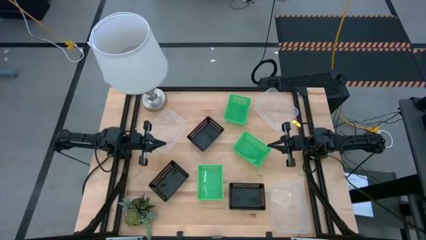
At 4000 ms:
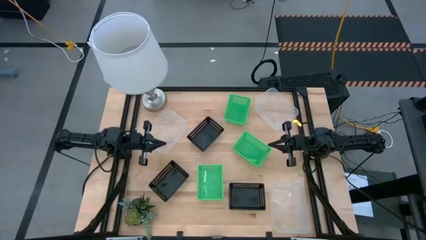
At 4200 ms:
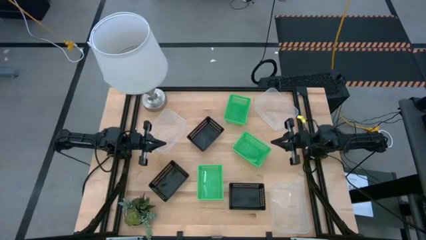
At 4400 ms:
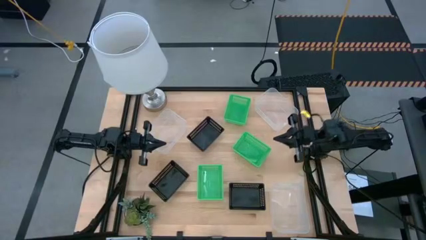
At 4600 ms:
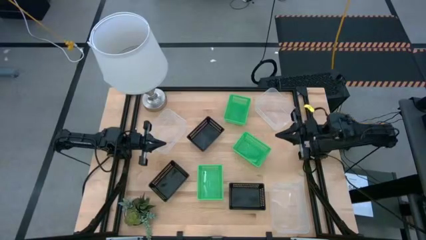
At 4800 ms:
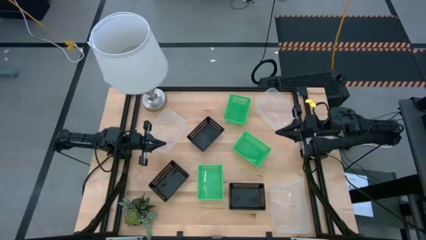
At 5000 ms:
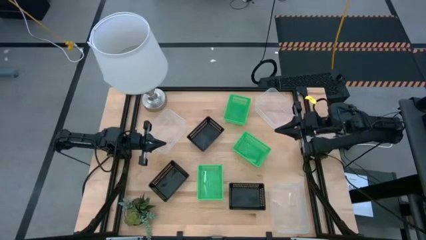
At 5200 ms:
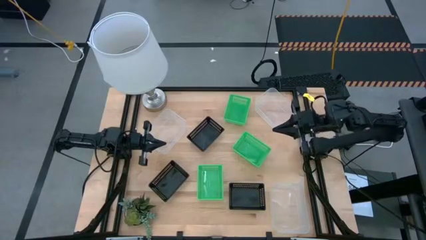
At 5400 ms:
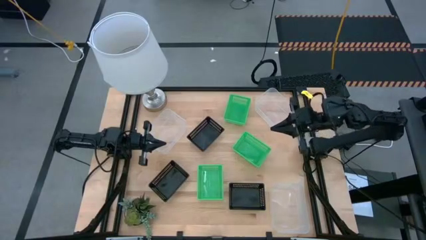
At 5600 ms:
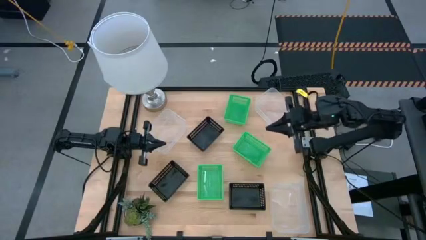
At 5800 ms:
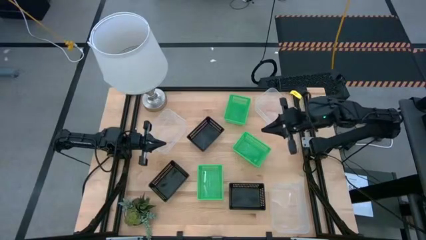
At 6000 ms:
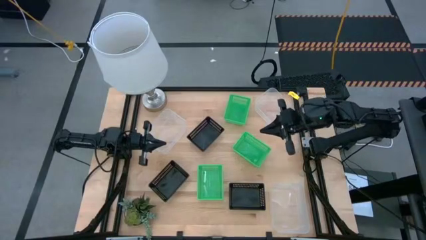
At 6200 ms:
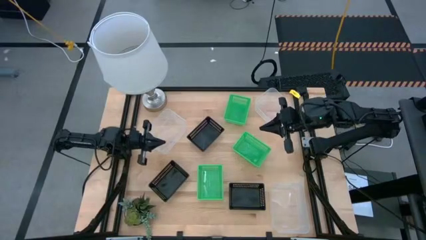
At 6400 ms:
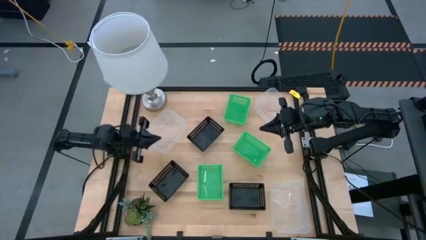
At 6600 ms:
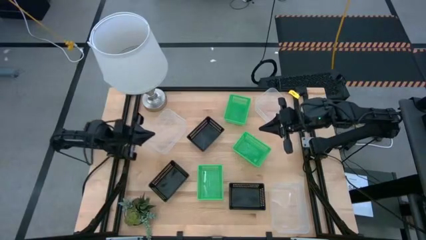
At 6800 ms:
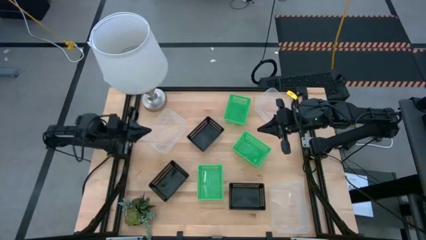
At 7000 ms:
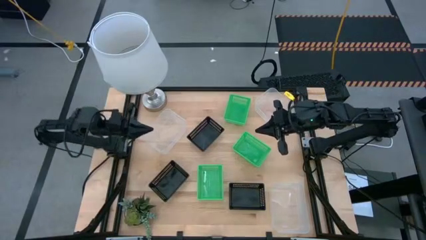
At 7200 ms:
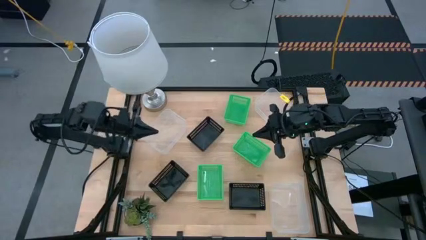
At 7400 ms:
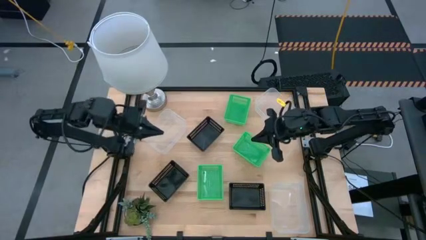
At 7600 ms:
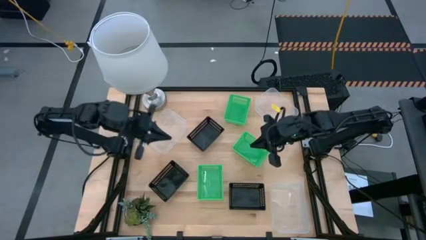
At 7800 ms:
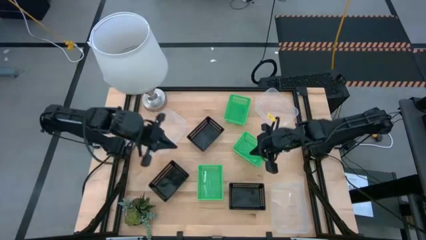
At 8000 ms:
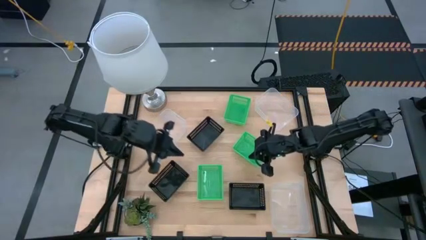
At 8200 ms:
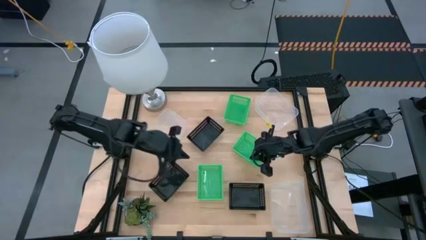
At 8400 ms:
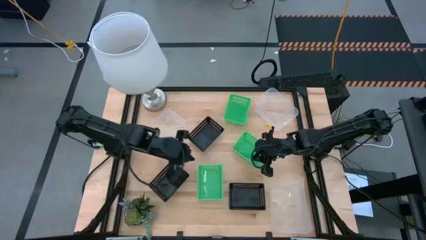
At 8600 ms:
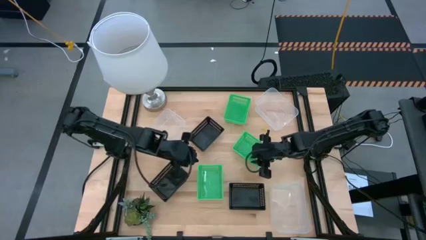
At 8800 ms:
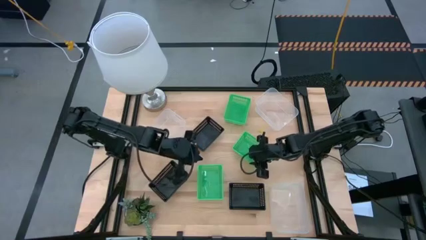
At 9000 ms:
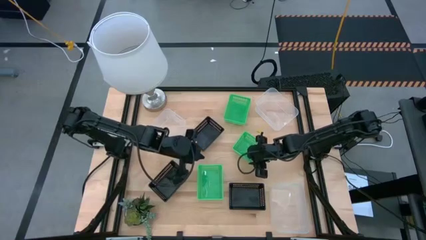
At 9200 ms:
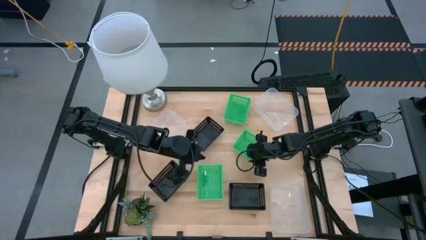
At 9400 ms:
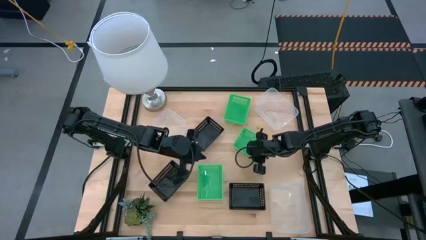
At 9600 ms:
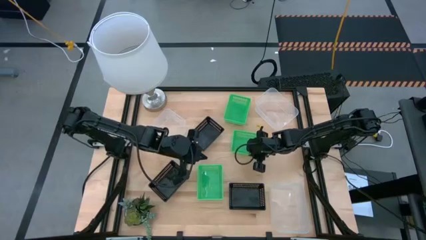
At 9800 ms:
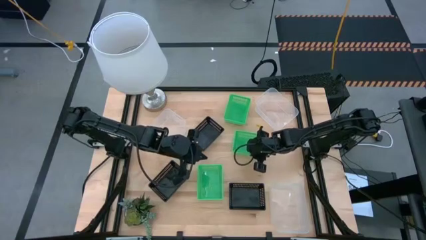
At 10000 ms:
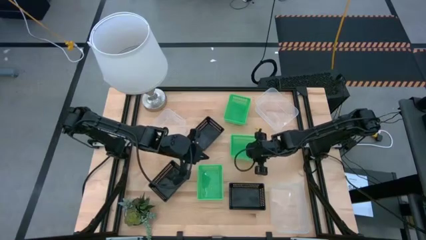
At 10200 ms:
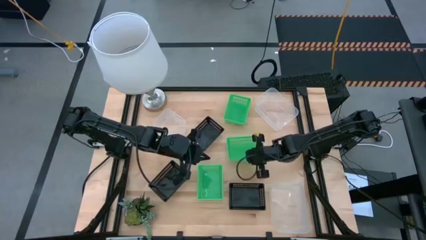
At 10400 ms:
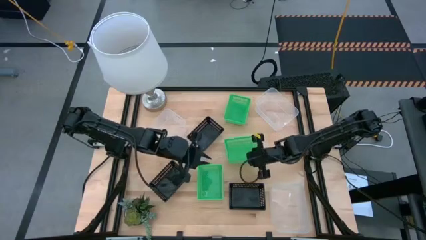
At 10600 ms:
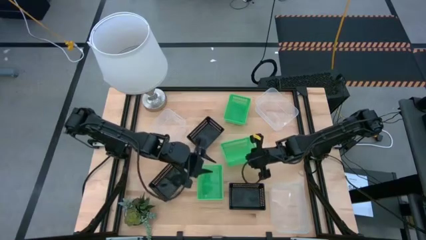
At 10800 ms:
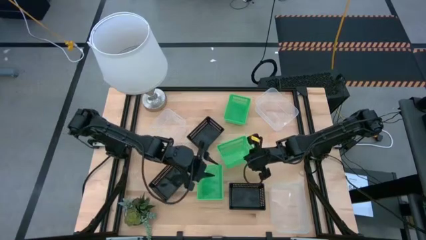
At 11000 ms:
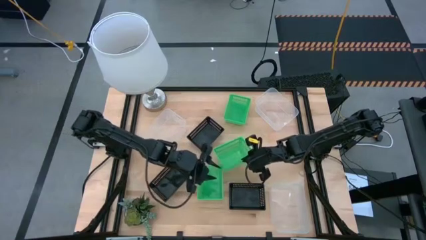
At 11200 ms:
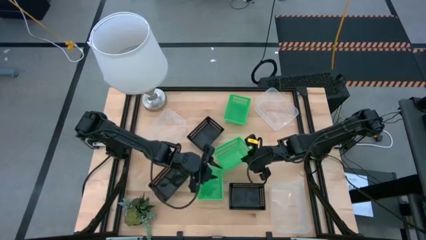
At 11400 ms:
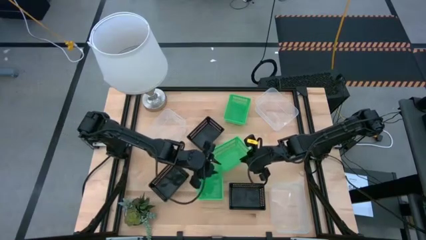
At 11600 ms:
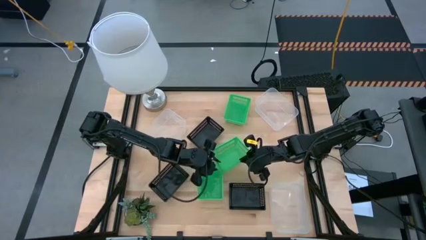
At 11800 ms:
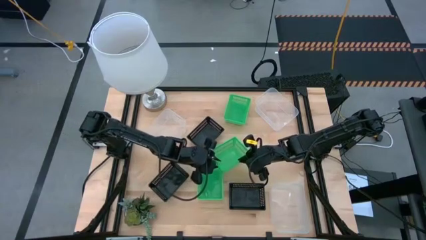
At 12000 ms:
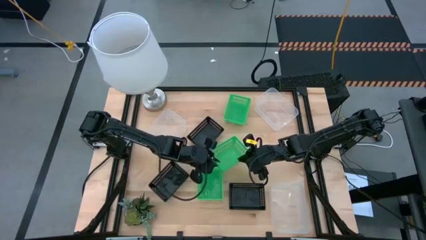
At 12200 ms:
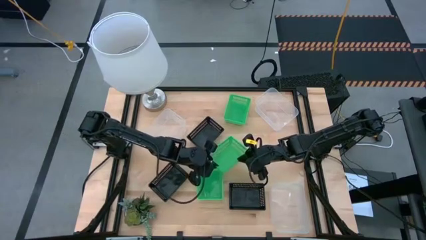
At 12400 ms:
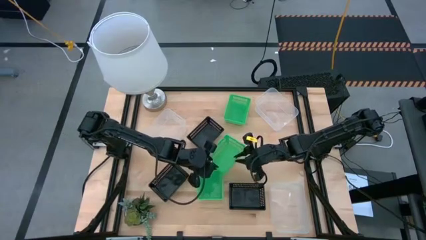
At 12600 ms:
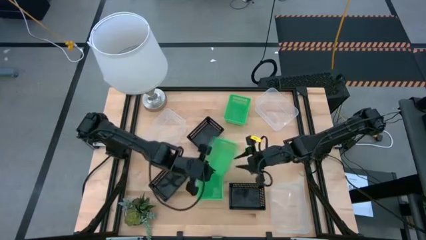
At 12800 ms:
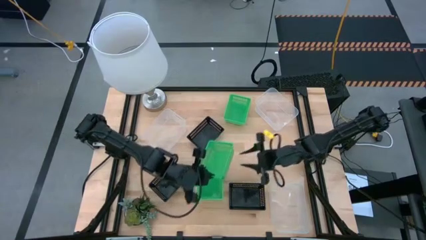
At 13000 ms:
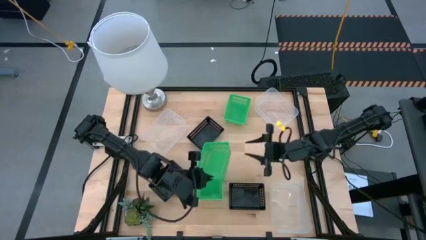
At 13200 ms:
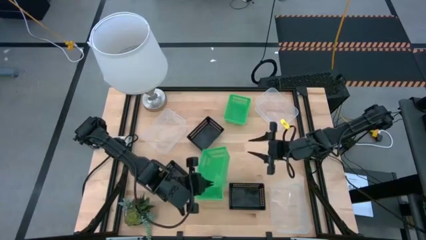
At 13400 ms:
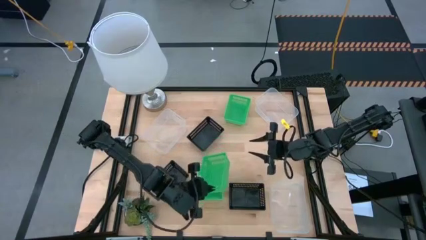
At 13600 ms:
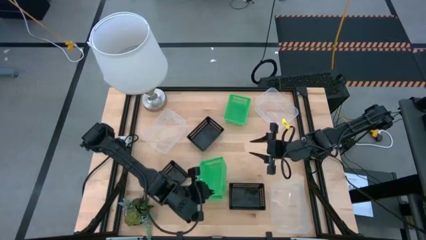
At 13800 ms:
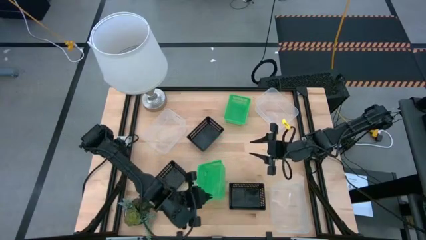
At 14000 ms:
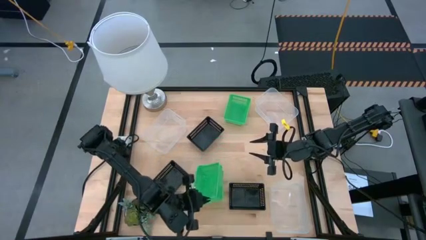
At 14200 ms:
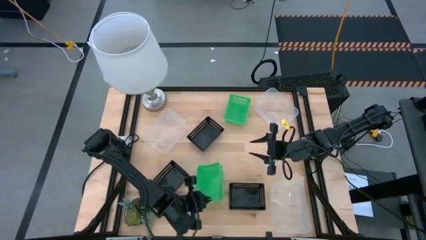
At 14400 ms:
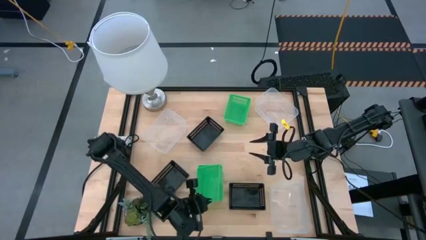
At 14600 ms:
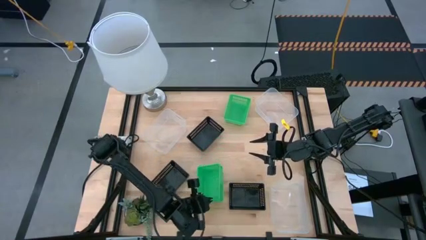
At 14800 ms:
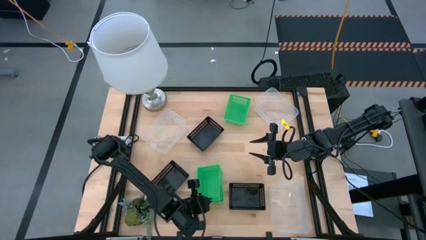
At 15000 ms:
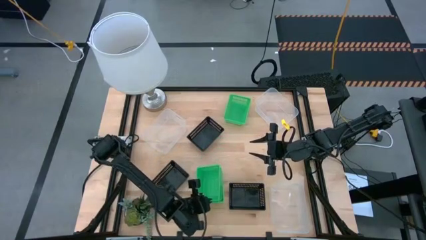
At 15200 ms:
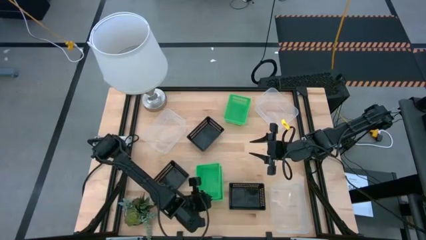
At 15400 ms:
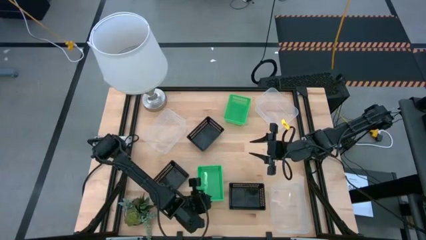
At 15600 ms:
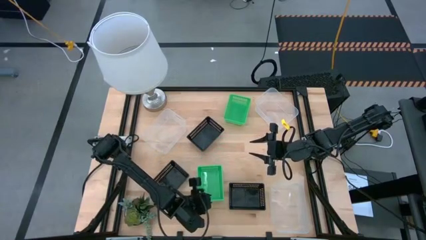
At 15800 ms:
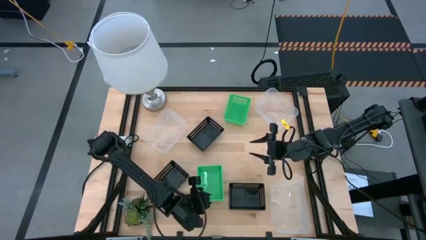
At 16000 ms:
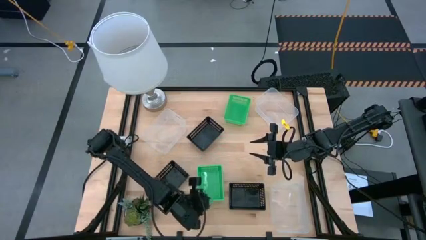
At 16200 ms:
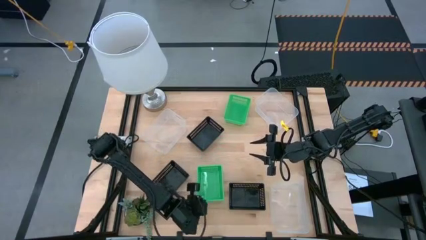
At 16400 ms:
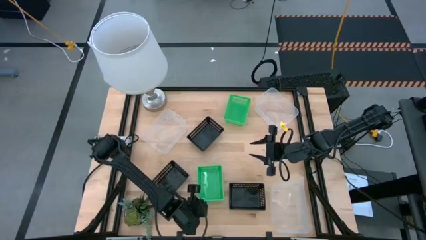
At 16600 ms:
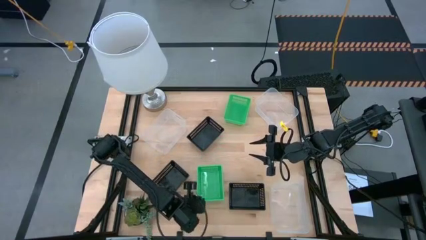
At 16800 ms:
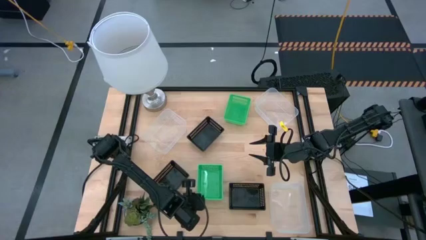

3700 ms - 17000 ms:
Stack the middle right green bin on top of the bottom green bin
